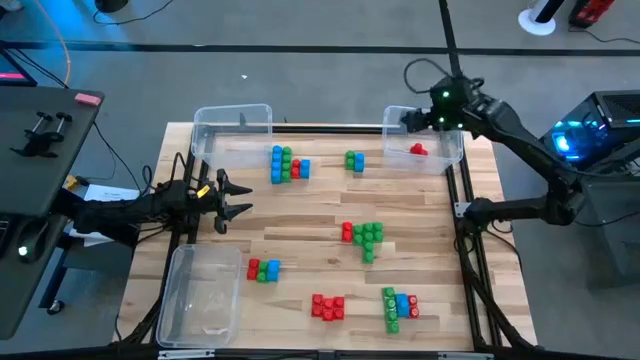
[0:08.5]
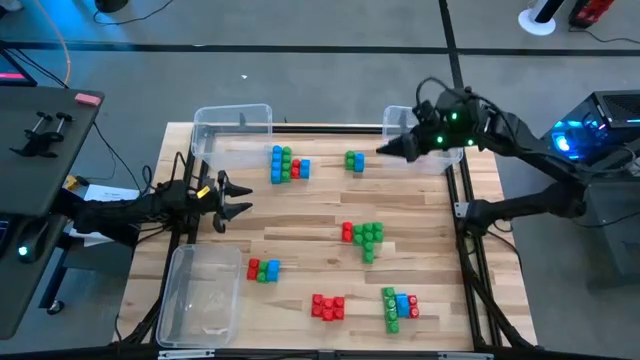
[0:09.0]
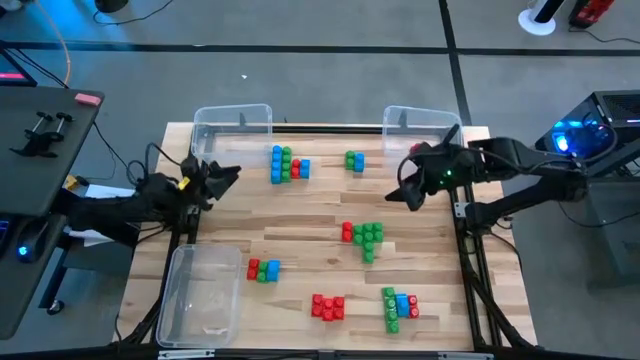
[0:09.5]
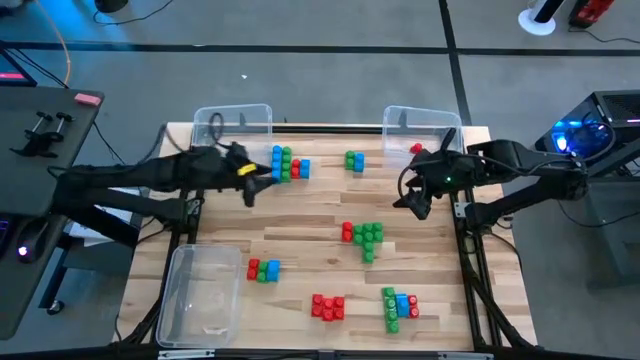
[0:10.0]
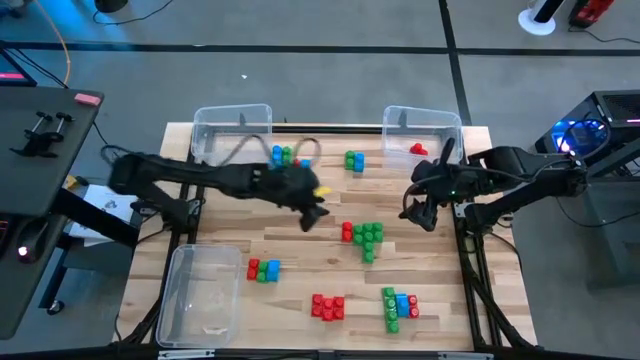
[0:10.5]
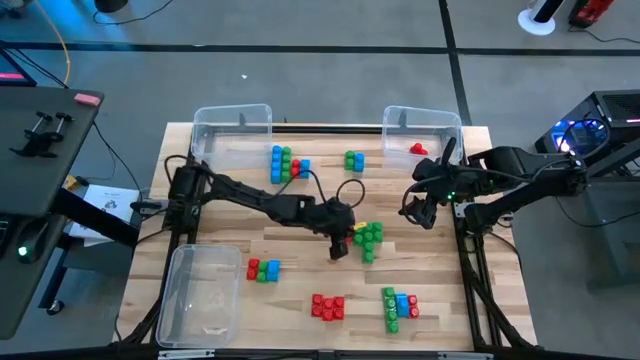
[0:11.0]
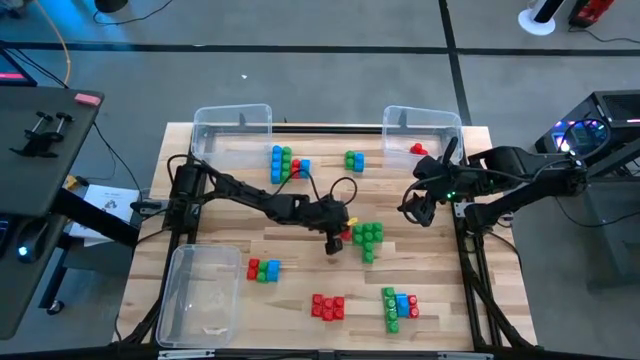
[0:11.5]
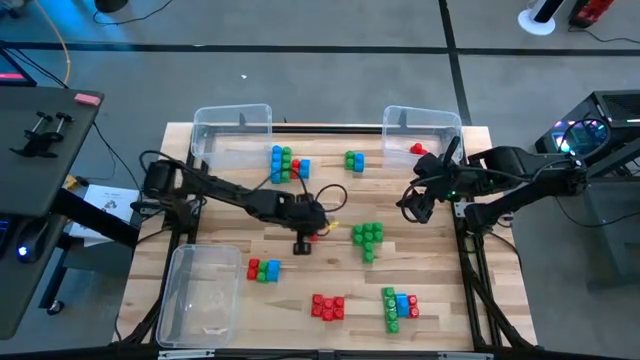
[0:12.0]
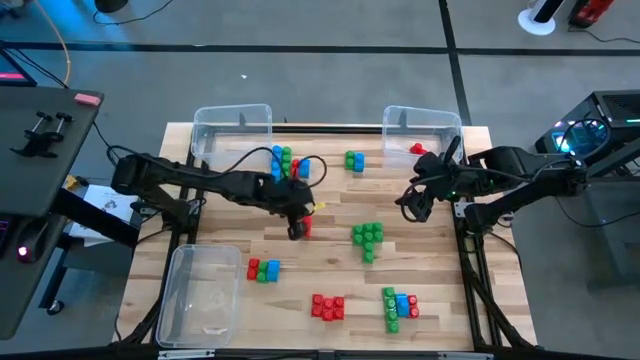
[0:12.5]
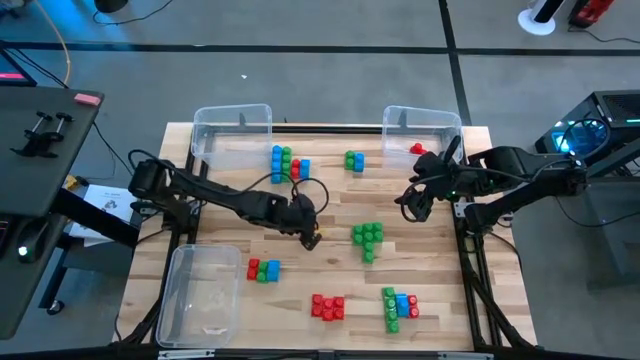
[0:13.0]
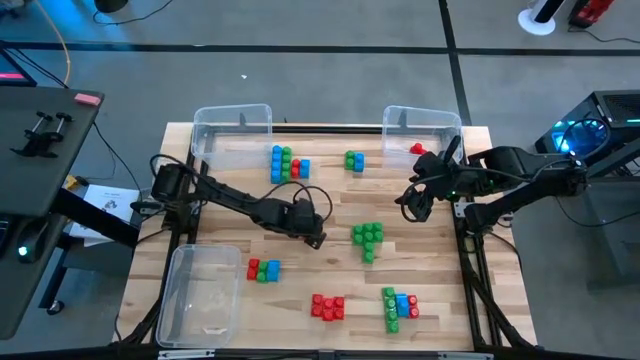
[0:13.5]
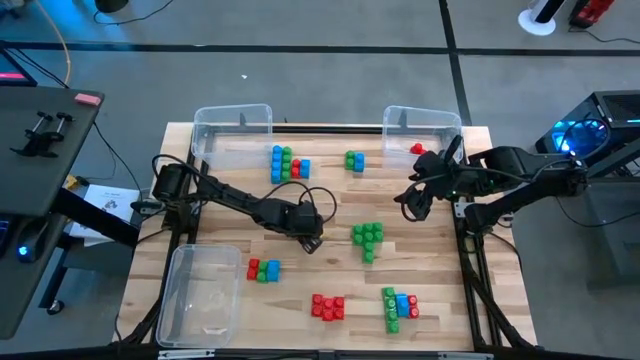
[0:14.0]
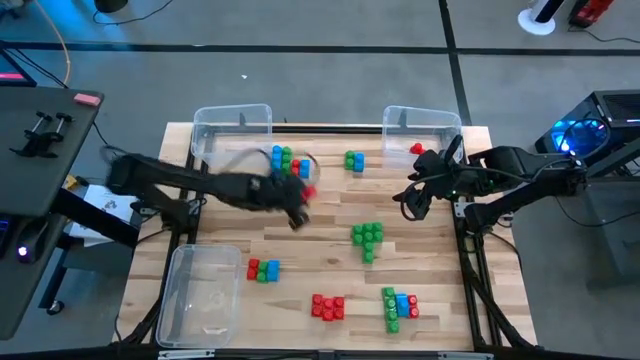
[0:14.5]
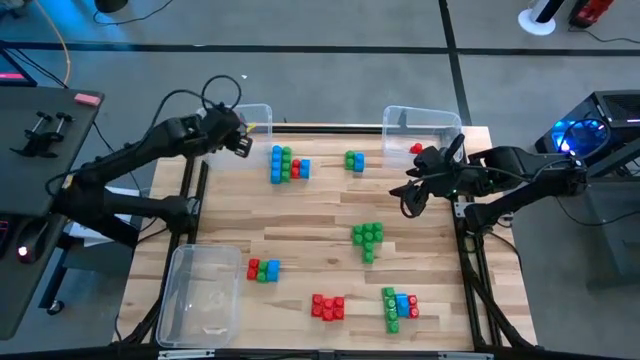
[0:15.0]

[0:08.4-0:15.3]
Task: Sort blocks
Put the red game piece into the top left transparent bin

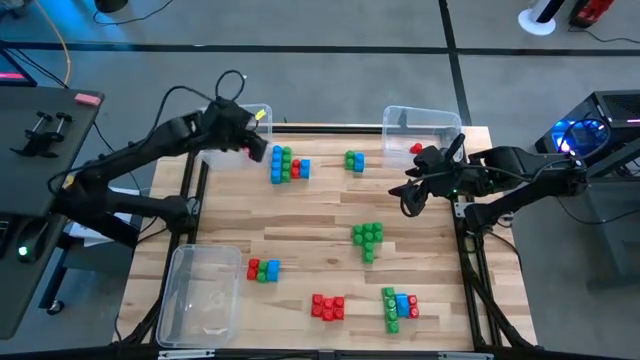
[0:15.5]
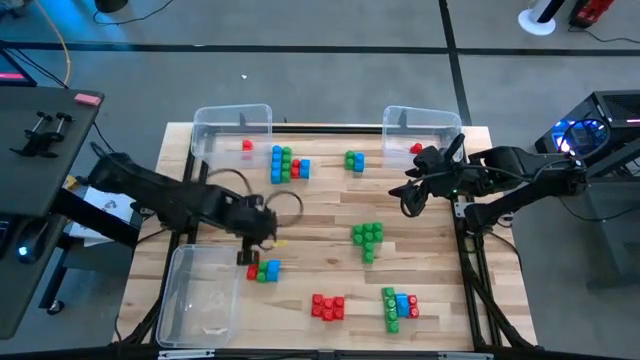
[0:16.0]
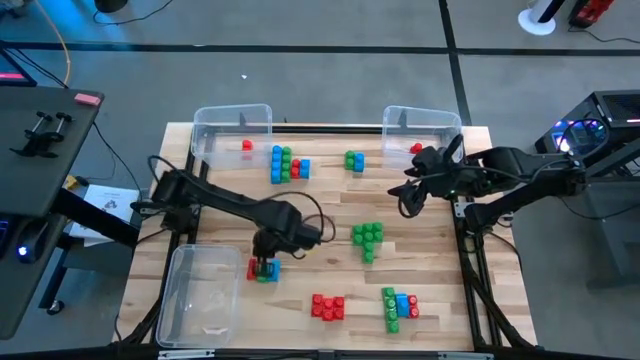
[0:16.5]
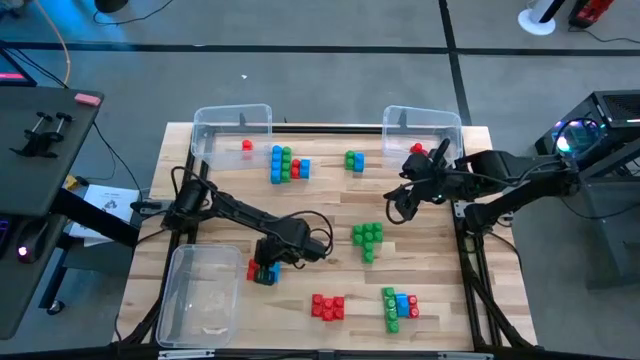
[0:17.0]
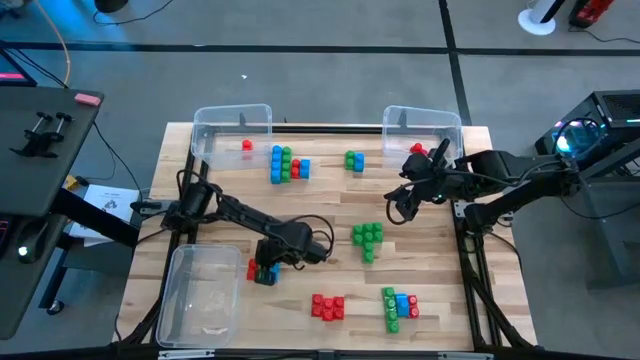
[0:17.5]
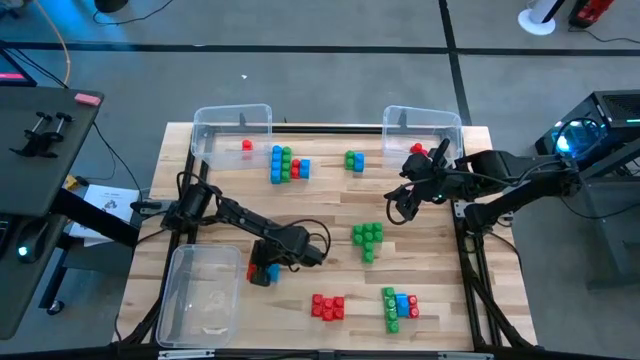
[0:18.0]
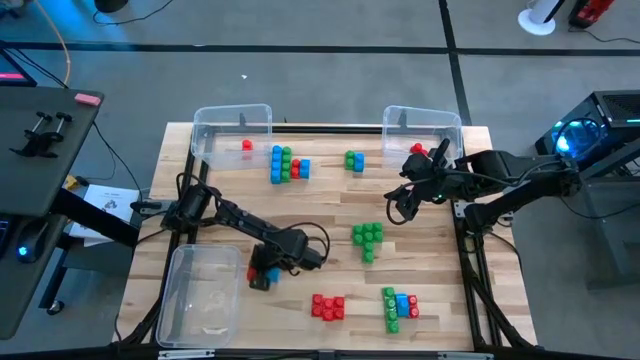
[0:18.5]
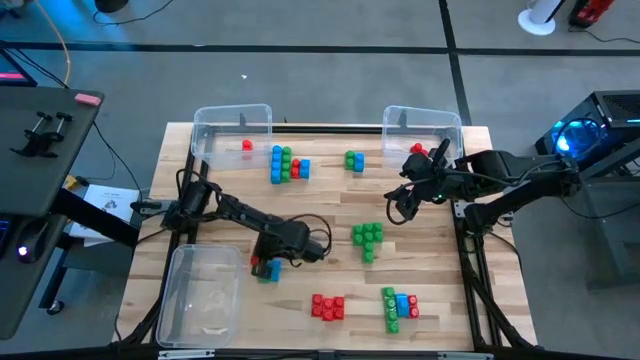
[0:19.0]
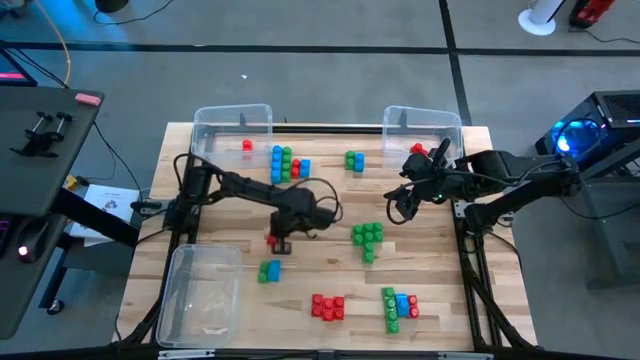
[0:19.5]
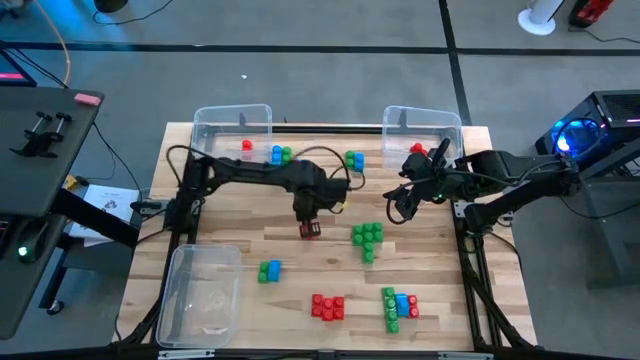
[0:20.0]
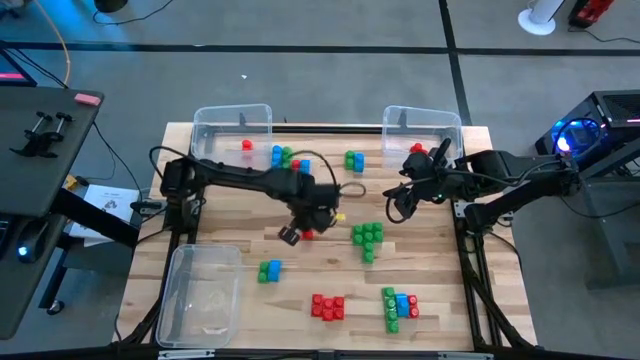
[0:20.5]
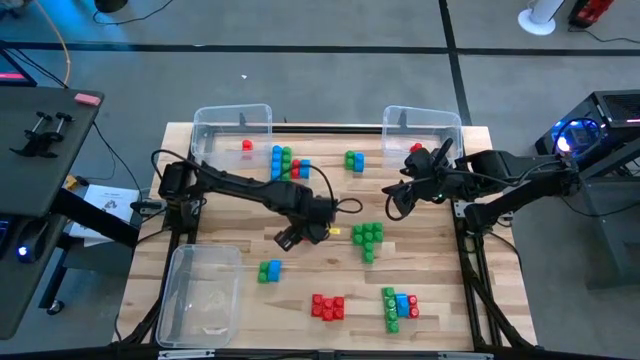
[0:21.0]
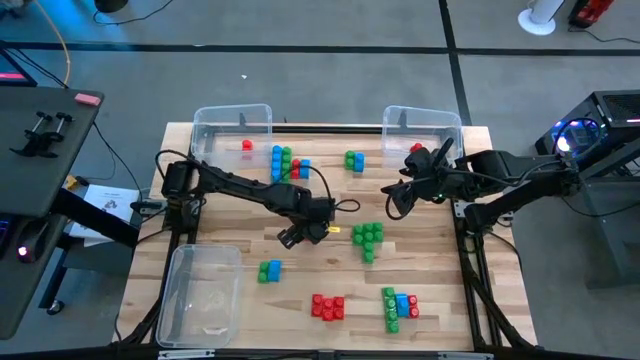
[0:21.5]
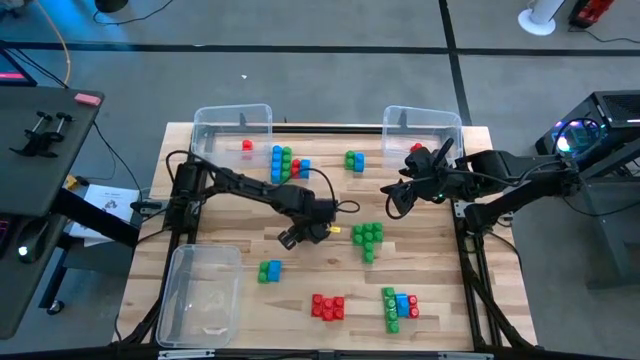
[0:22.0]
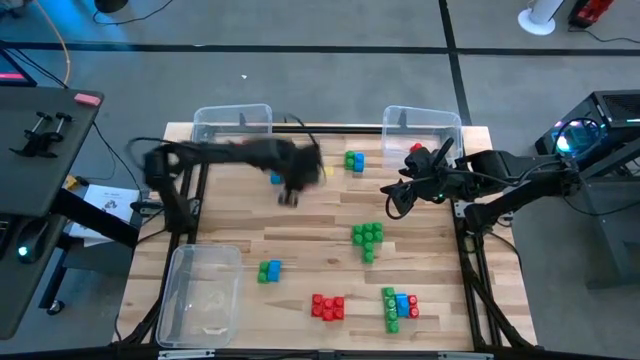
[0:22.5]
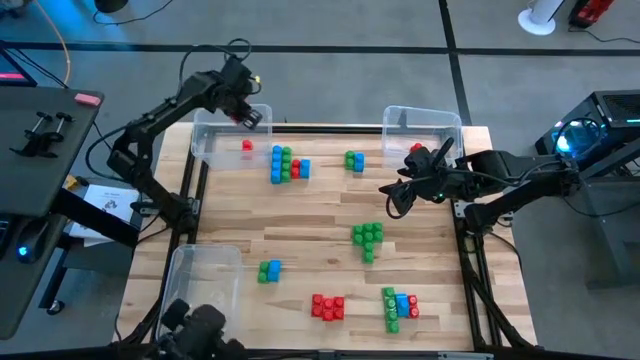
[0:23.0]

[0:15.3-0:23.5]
Put the red game piece into the top left transparent bin

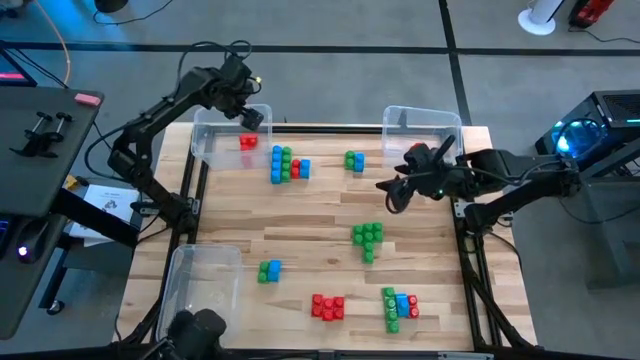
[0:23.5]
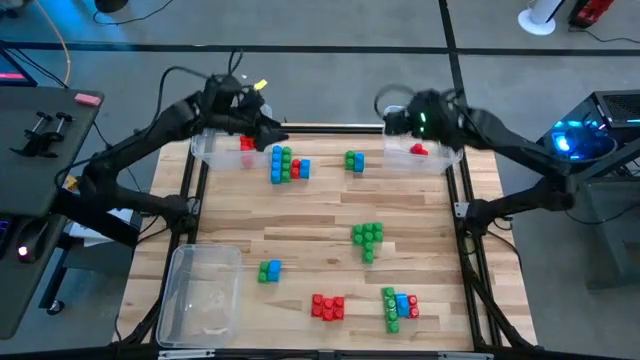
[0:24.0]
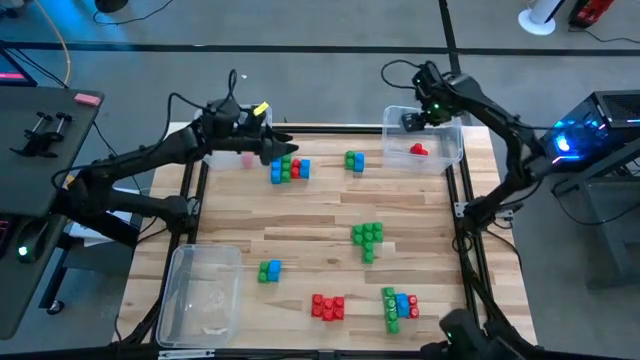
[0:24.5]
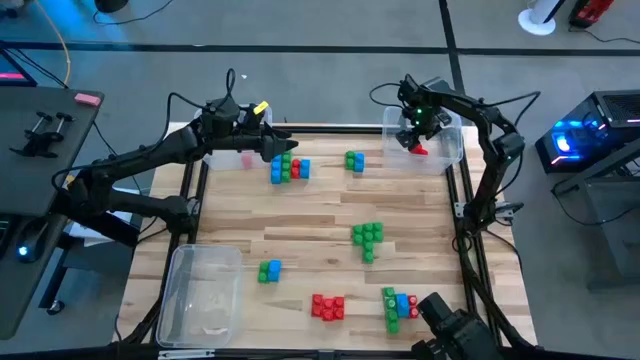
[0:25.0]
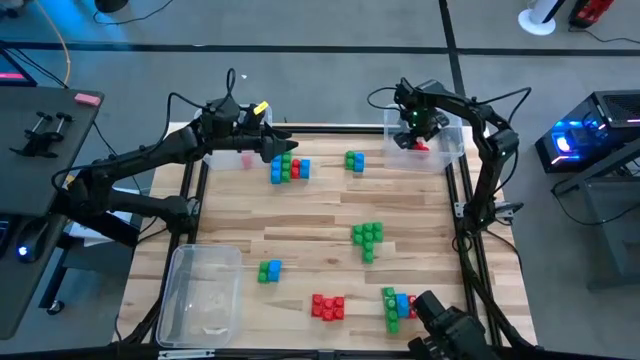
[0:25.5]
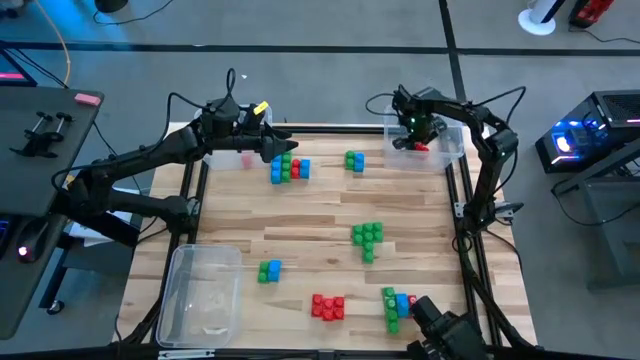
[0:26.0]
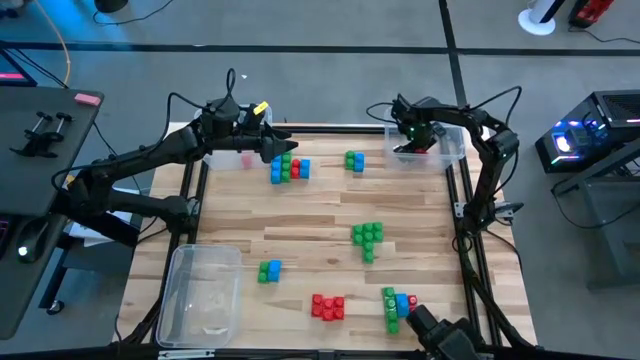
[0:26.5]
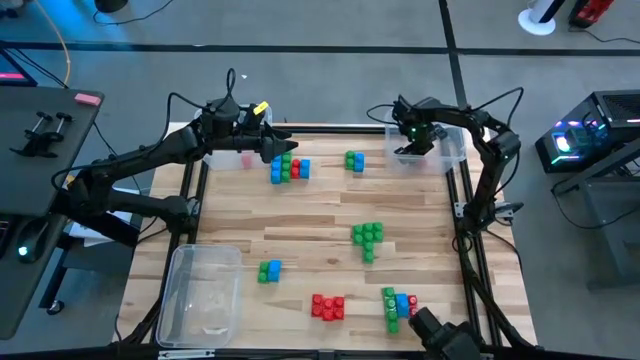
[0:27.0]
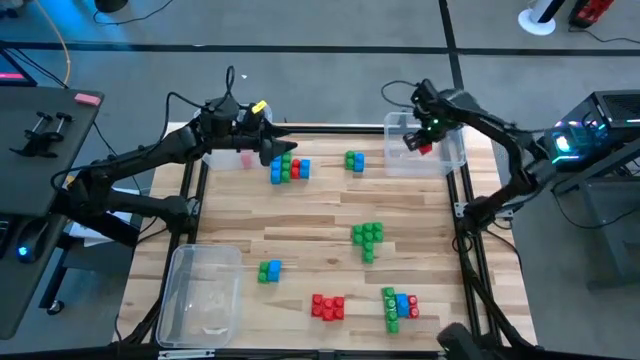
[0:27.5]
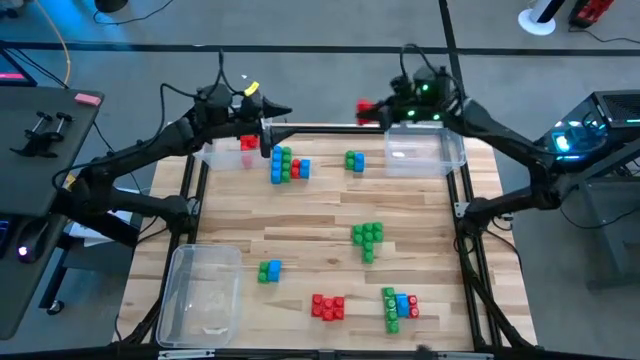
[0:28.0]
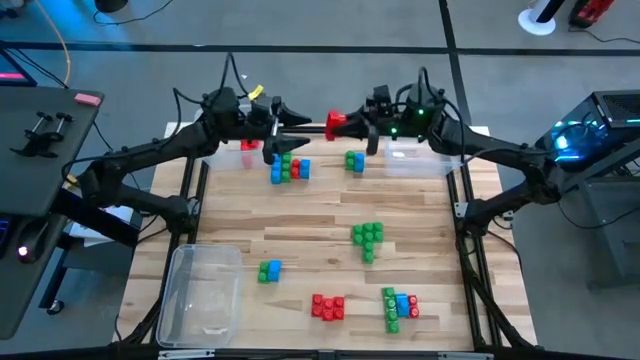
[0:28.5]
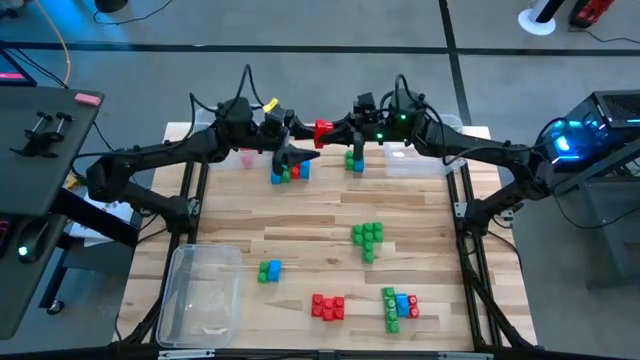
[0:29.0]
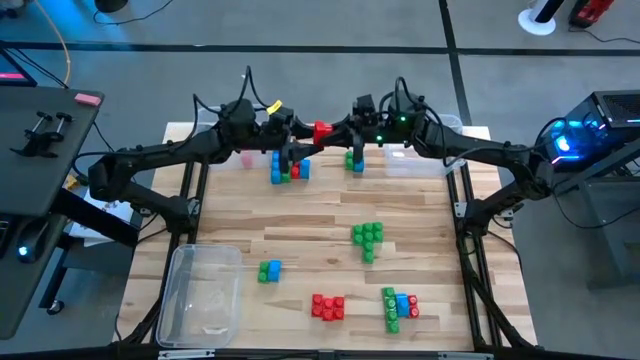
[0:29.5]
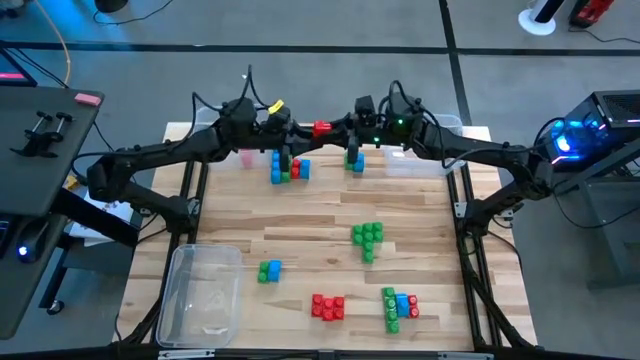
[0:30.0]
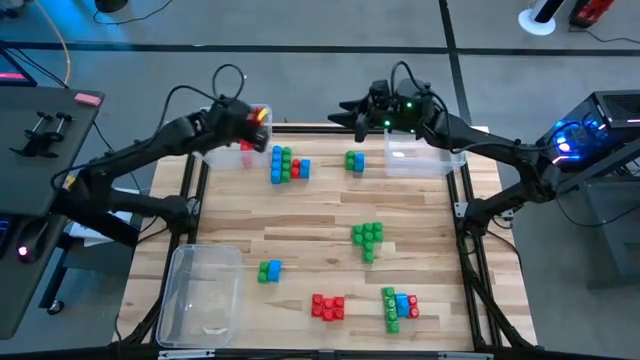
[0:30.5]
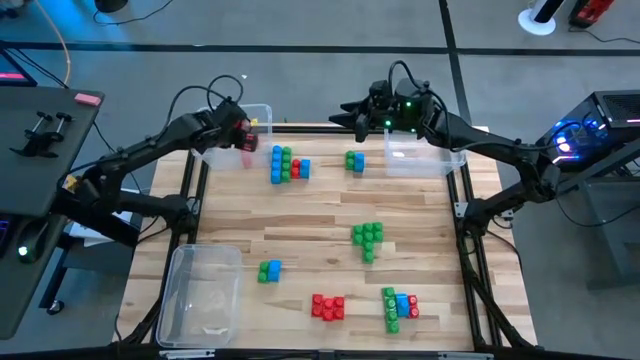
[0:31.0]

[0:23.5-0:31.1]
Put the red game piece from the top right transparent bin to the top left transparent bin
